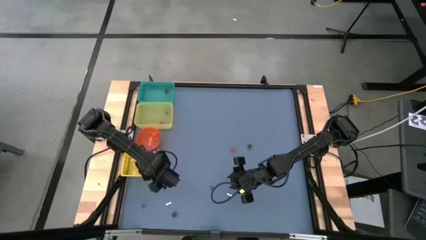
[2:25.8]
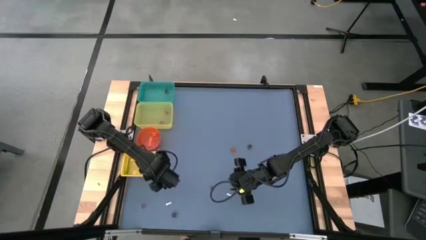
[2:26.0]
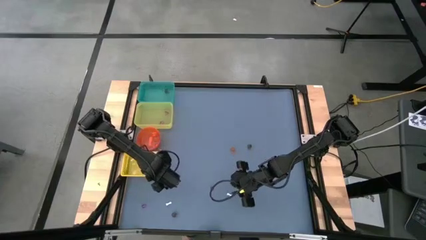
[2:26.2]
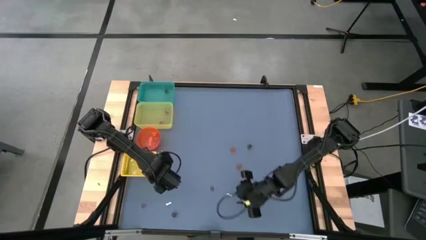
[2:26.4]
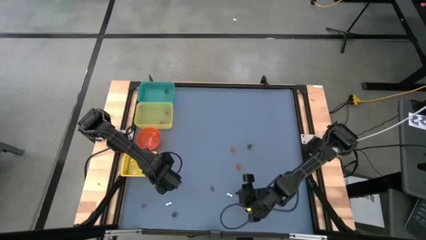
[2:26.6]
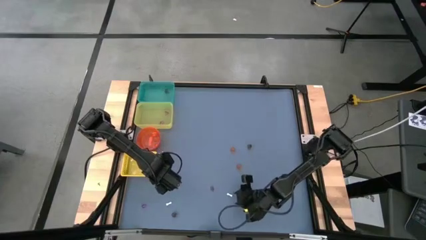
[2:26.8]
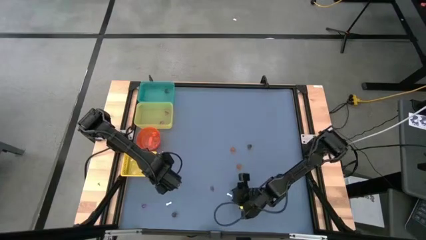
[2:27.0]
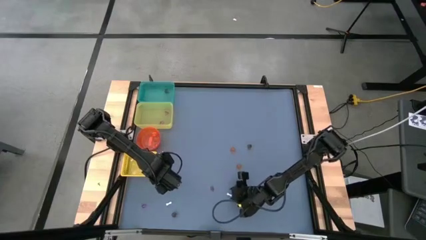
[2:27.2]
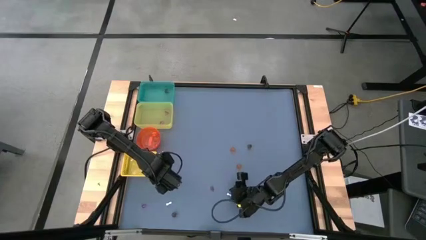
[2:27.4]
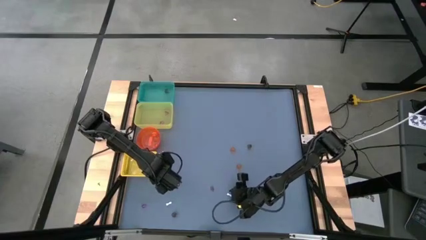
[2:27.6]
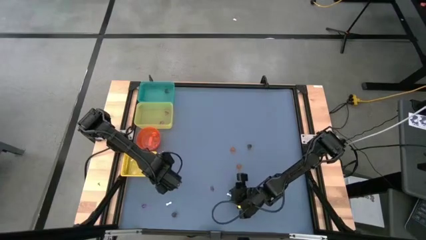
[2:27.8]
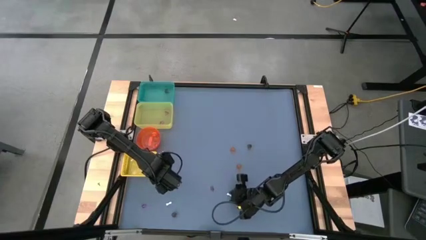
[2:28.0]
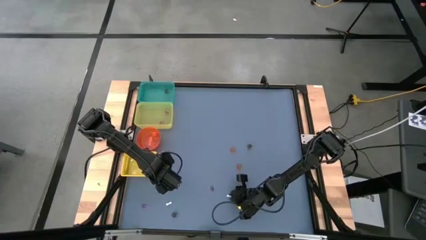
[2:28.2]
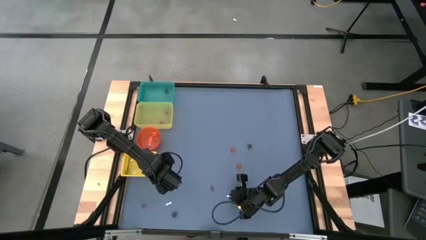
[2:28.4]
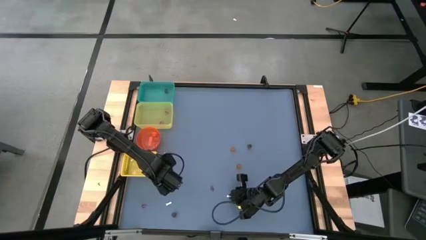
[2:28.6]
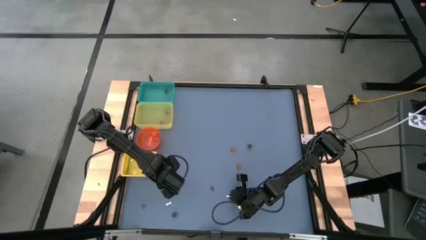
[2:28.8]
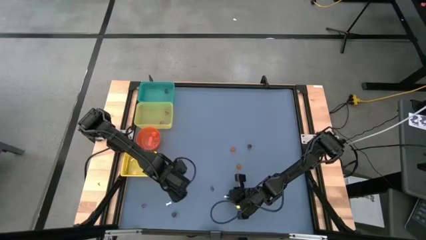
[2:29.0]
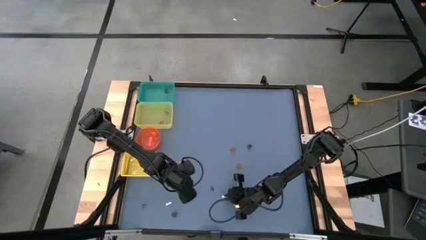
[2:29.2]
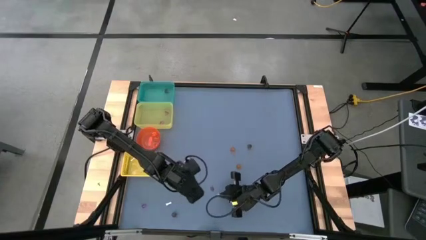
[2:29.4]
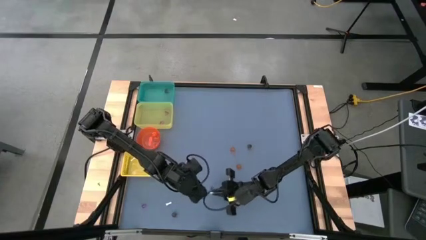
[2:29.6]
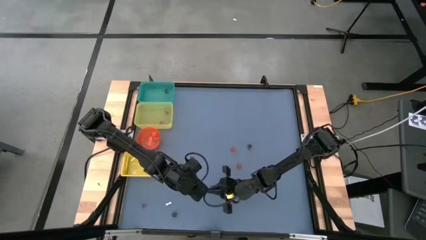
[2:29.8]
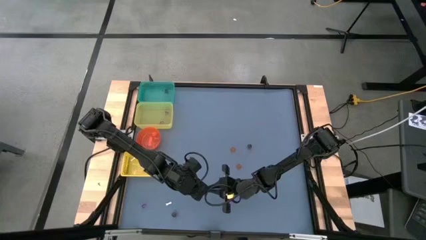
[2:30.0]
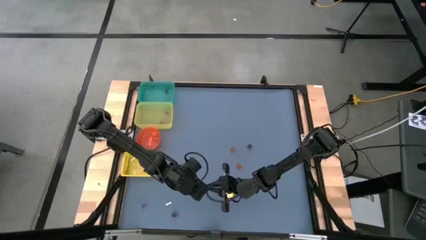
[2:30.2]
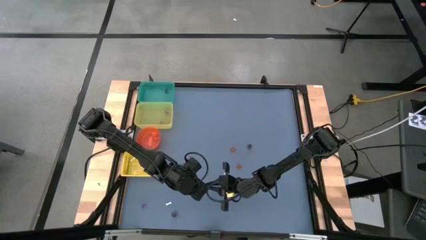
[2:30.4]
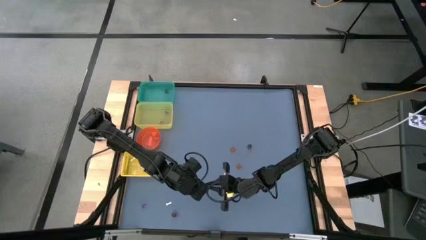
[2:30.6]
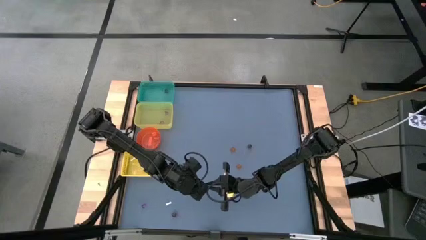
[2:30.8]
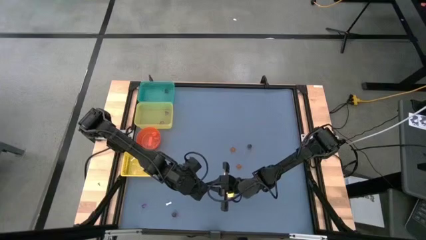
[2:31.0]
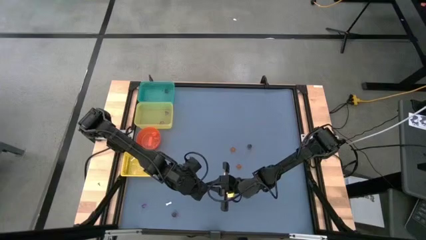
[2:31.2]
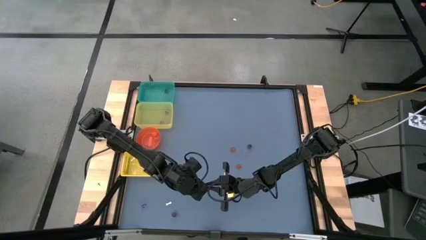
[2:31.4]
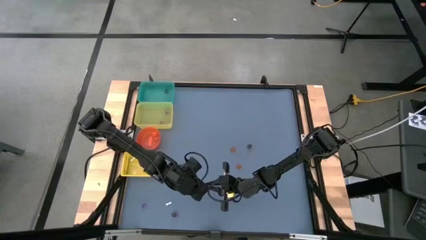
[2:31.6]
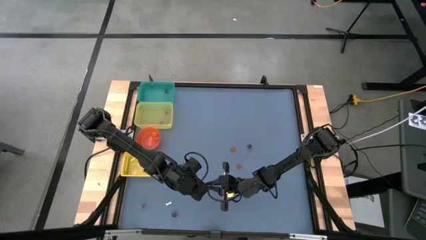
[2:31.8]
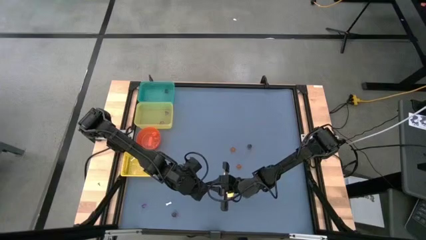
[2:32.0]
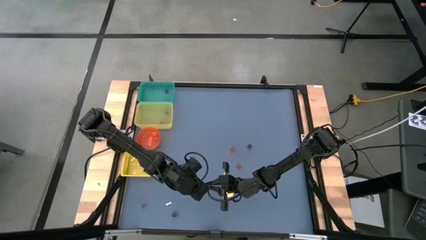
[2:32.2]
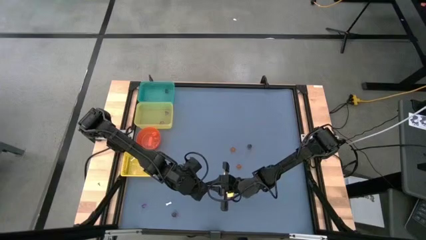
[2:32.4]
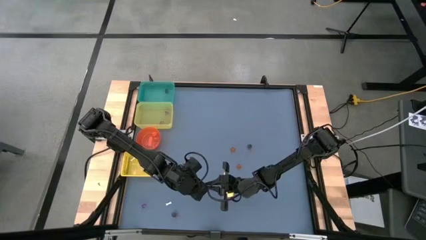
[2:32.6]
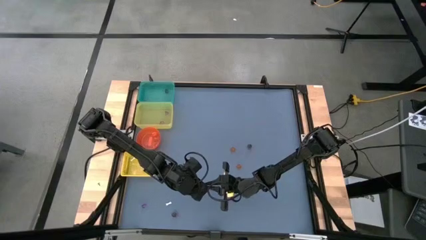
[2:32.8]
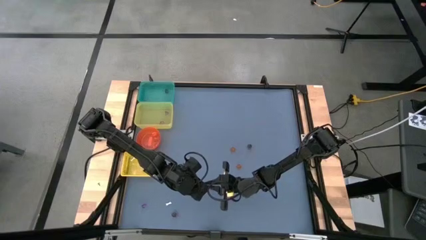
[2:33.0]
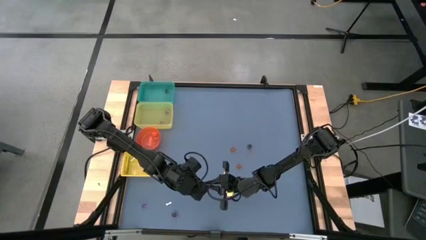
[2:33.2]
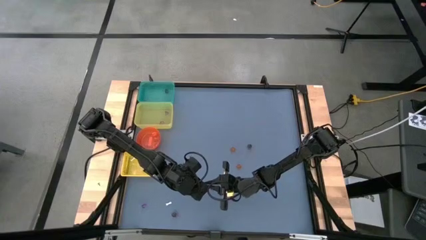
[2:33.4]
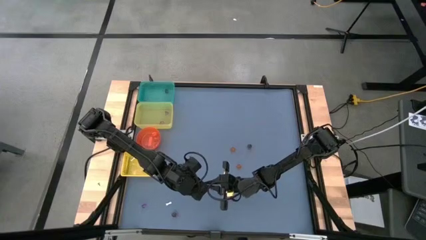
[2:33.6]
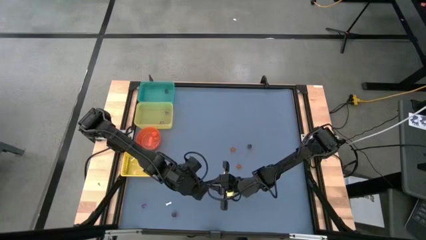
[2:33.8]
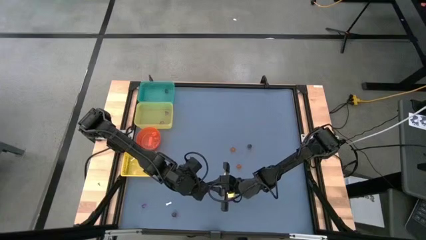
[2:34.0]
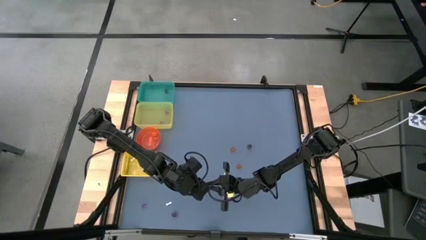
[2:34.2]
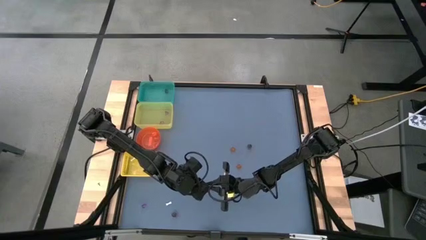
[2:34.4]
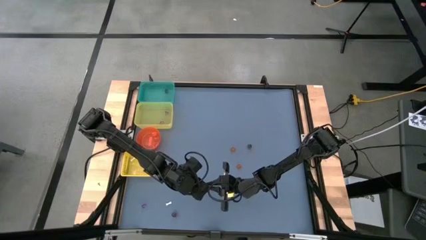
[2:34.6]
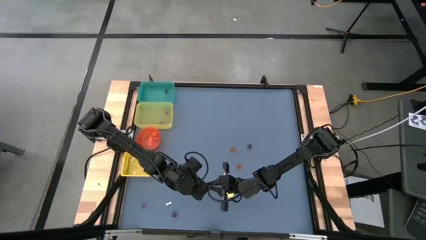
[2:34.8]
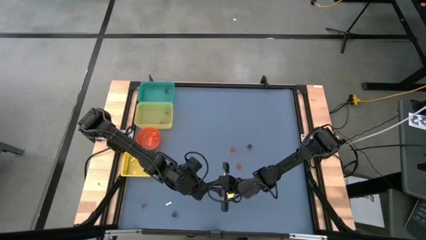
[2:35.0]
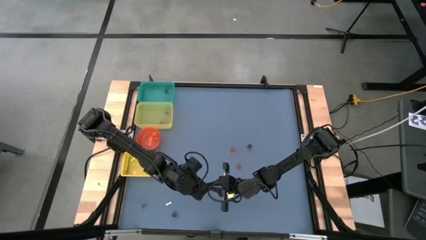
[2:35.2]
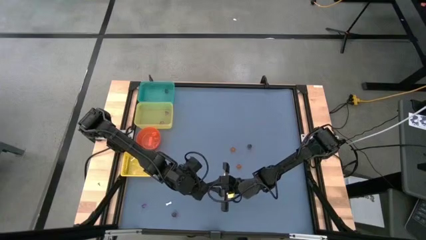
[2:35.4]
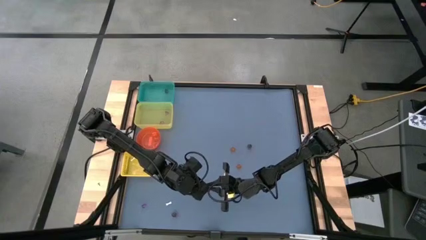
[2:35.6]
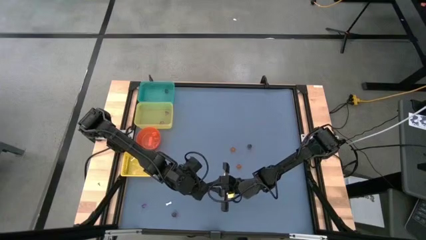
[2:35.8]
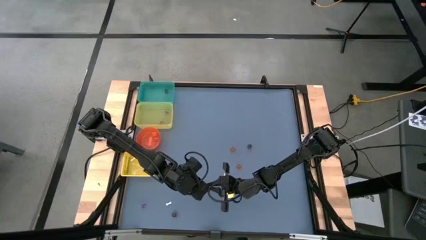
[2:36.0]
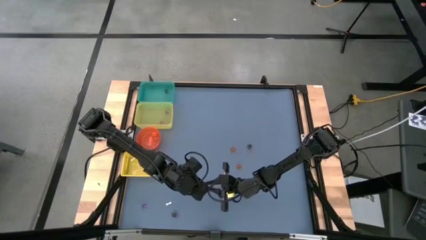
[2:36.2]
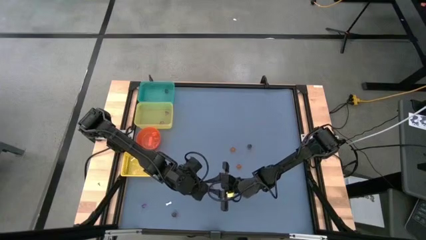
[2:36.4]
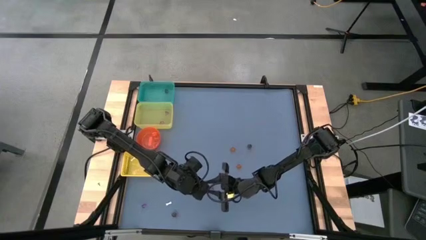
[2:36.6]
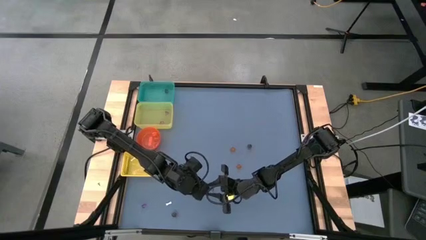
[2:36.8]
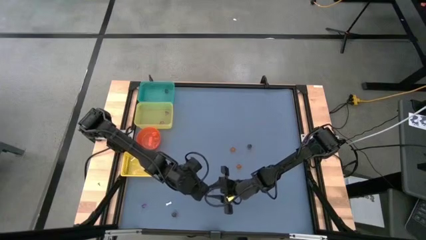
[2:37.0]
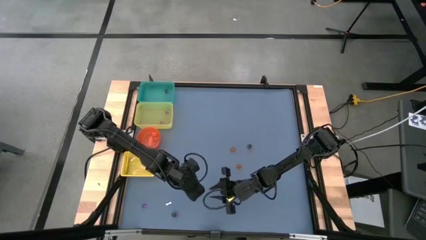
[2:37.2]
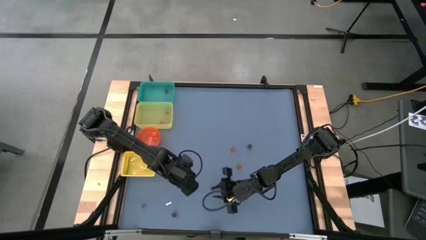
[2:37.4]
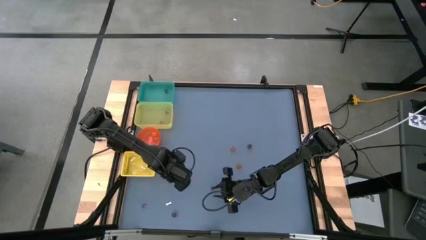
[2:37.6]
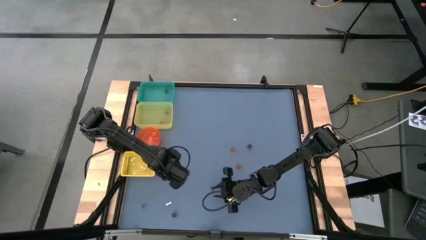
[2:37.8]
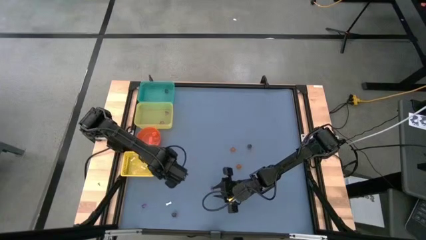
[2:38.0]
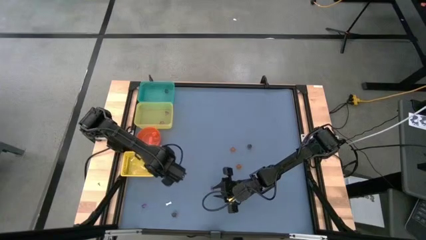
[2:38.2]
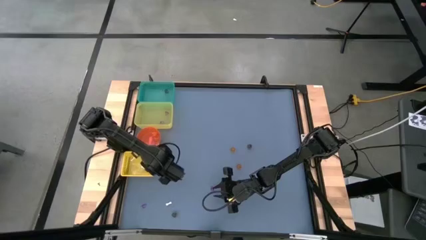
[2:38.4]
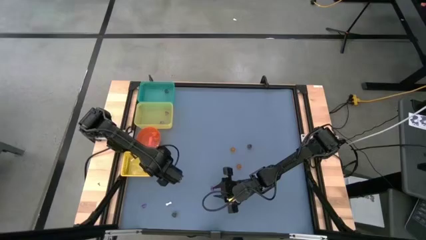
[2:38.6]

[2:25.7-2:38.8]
Task: Sort Halloween decoration
Put the right white bone toy into the yellow basket

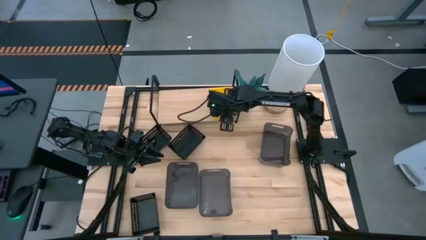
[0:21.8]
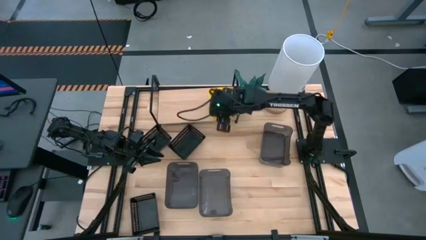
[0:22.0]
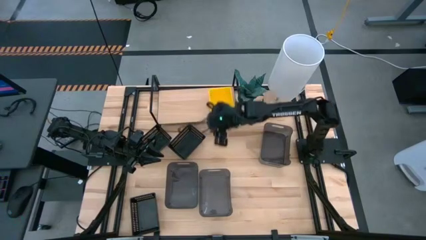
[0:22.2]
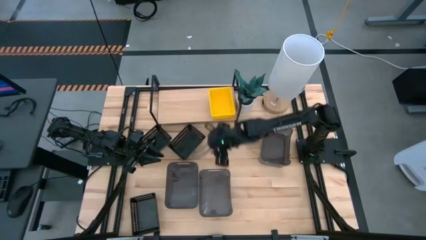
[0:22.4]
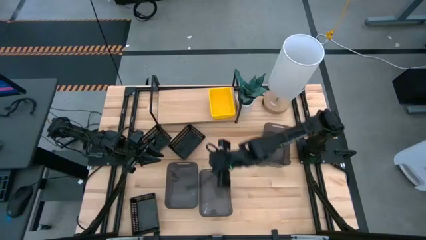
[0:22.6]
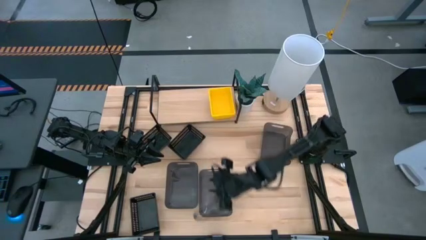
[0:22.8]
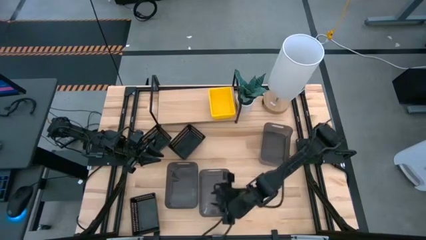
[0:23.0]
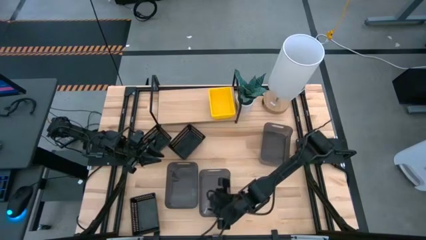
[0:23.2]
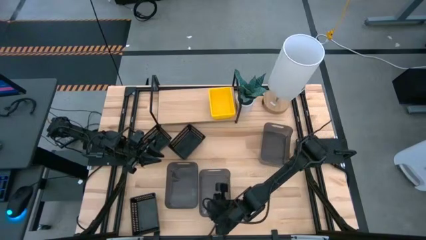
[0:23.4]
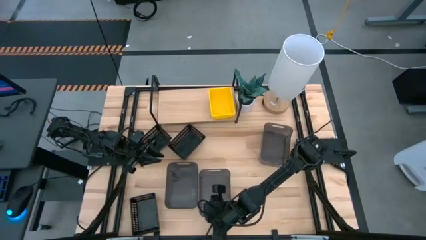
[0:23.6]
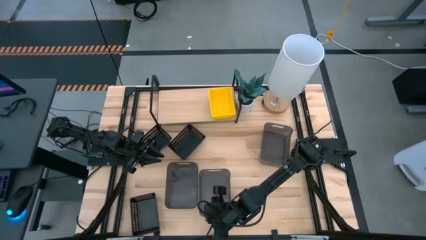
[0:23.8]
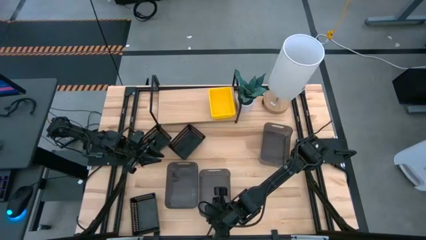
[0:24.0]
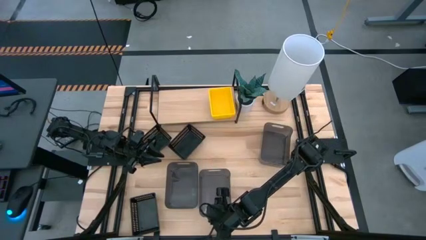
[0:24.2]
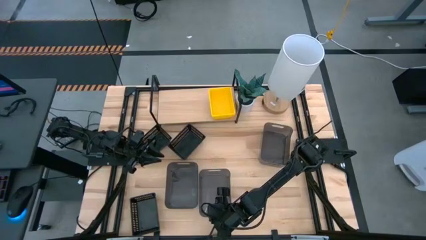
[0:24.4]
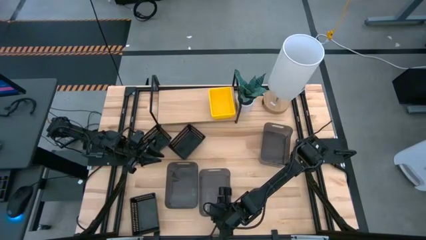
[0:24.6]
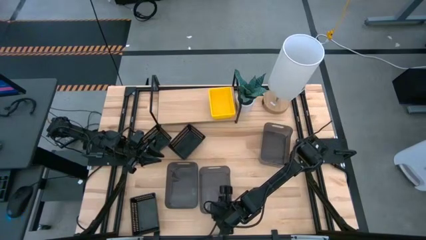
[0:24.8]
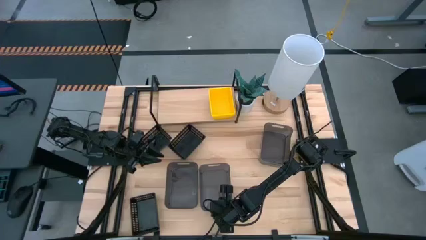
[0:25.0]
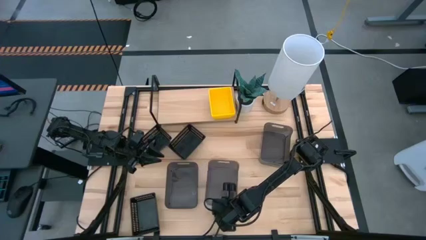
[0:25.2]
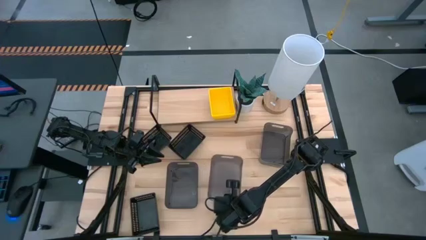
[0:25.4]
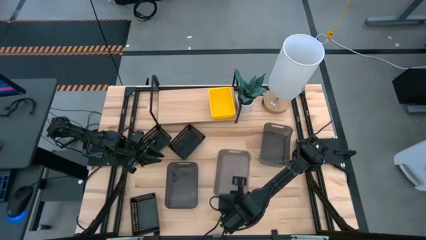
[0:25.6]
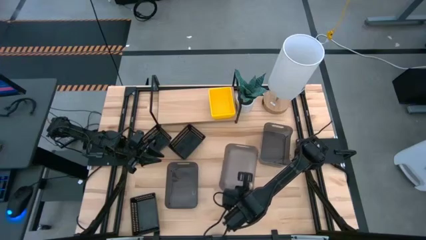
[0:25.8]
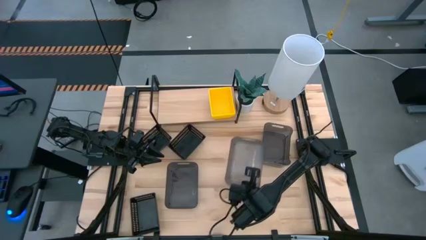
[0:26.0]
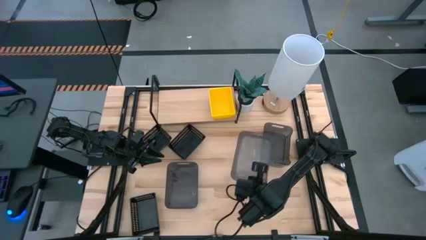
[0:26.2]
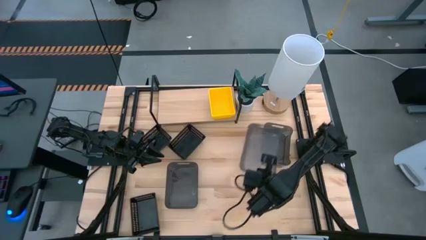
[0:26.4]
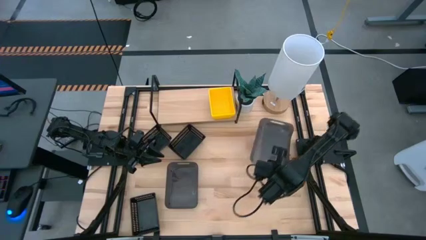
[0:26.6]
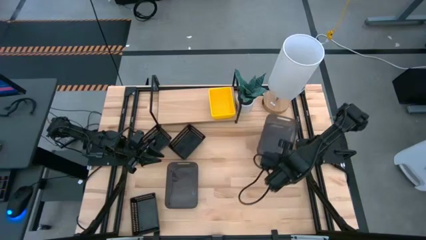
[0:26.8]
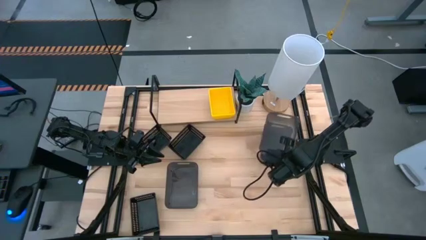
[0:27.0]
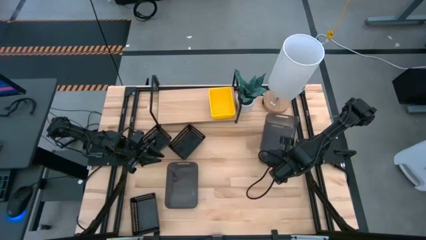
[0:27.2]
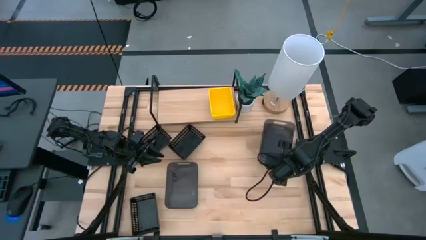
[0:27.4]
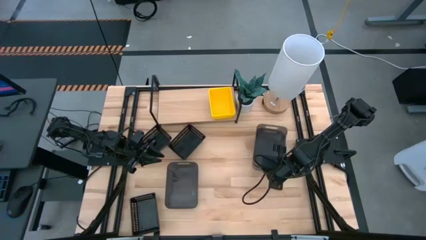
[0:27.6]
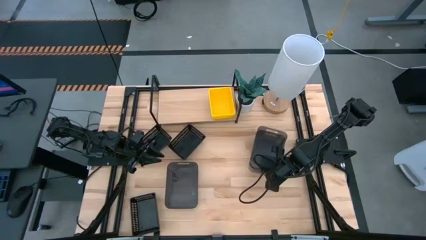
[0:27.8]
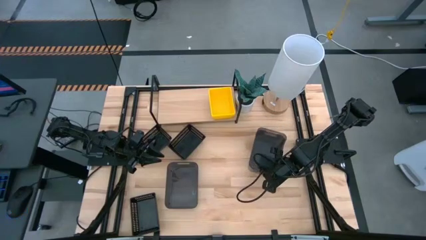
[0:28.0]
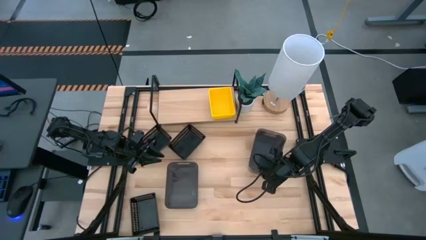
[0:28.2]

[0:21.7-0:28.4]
Task: Stack baskets on shelf by color
Stack the bottom right transparent black bin on the top transparent black bin
